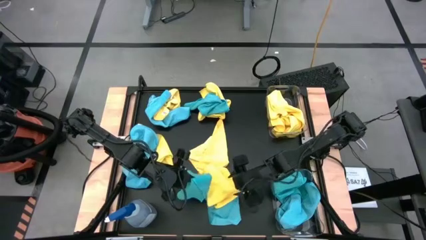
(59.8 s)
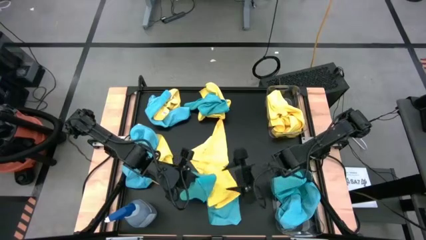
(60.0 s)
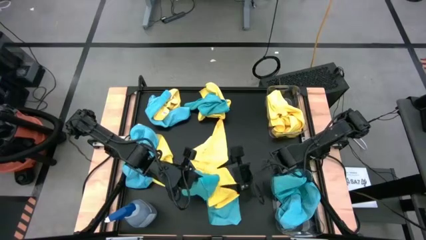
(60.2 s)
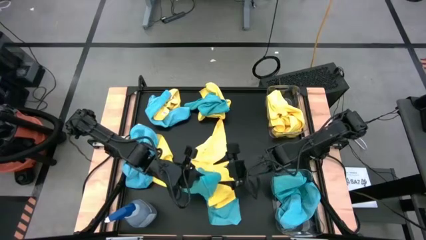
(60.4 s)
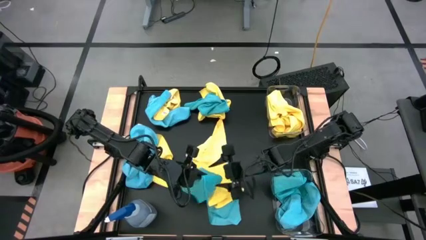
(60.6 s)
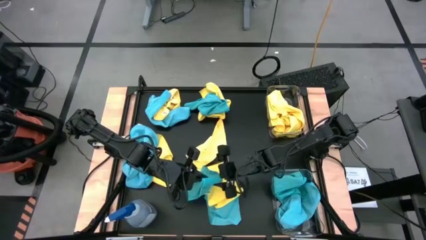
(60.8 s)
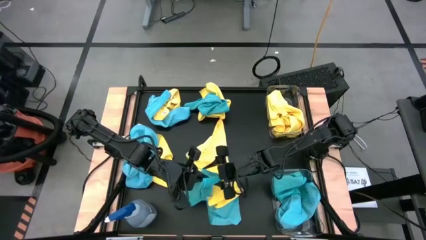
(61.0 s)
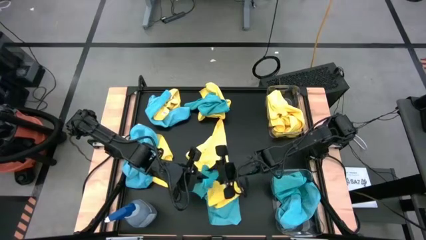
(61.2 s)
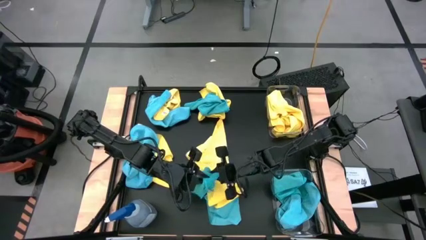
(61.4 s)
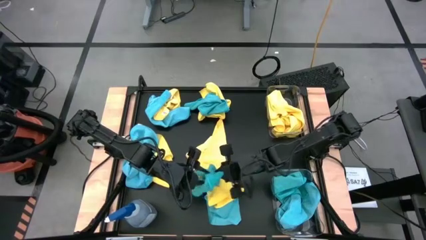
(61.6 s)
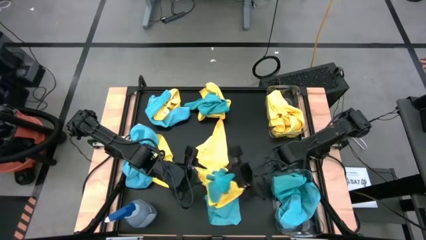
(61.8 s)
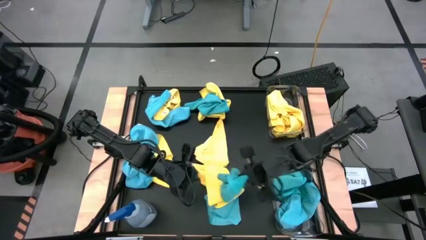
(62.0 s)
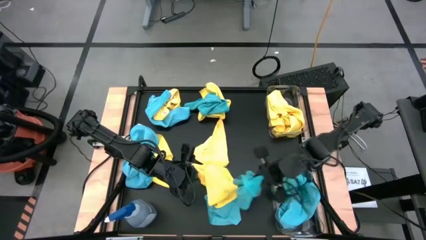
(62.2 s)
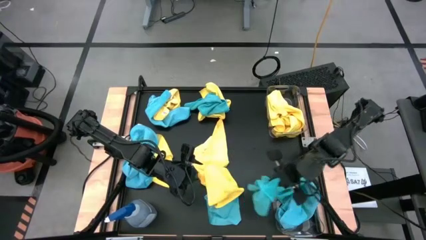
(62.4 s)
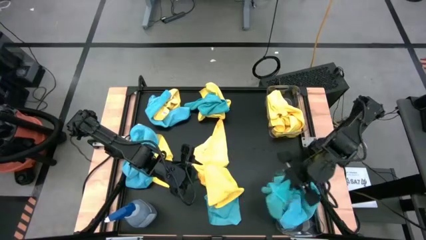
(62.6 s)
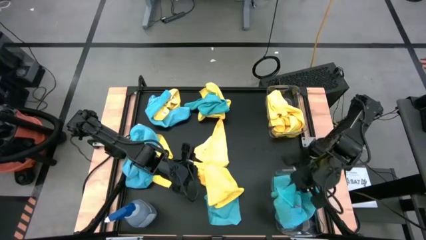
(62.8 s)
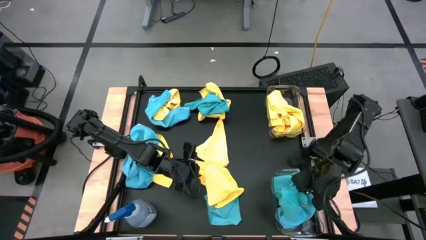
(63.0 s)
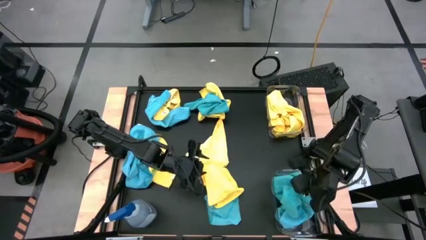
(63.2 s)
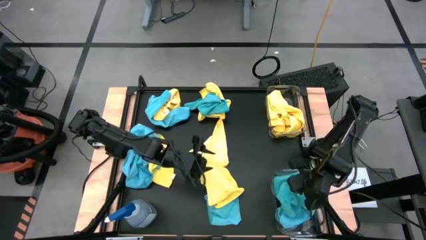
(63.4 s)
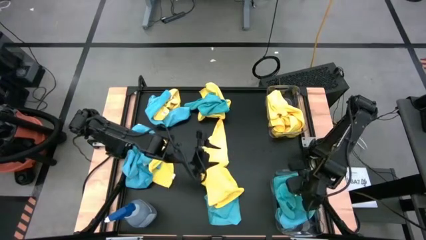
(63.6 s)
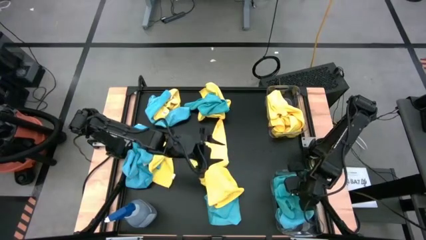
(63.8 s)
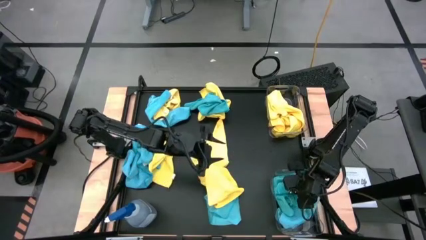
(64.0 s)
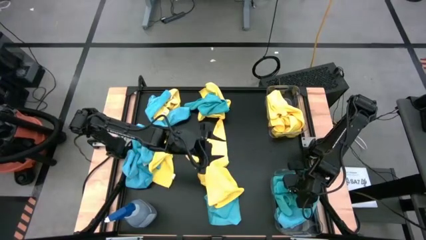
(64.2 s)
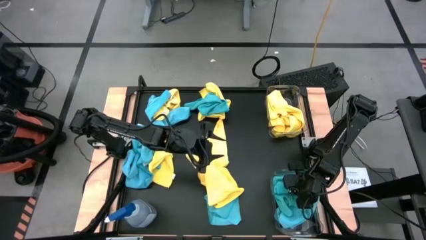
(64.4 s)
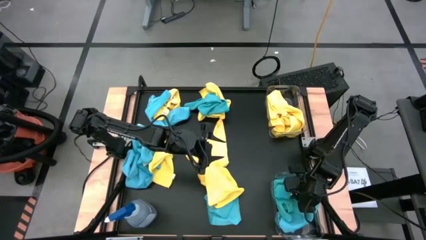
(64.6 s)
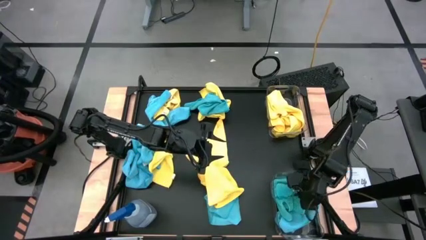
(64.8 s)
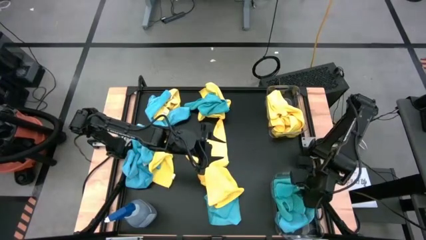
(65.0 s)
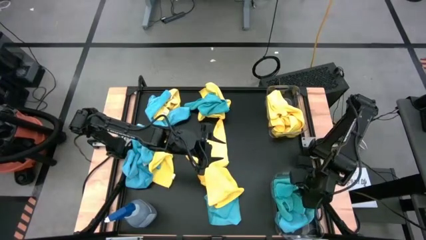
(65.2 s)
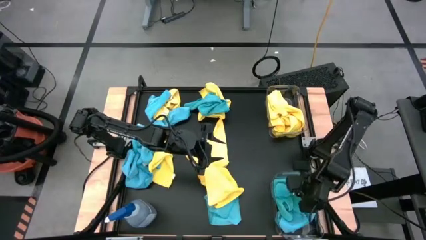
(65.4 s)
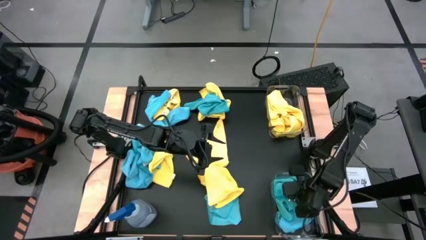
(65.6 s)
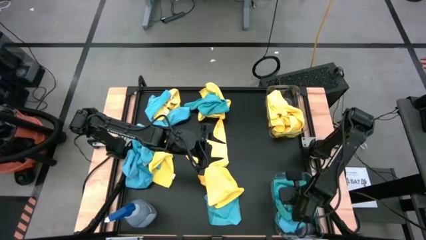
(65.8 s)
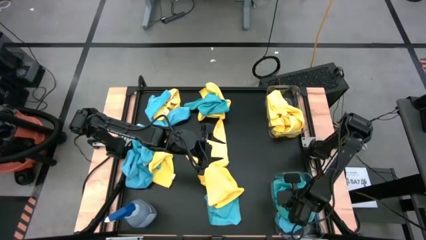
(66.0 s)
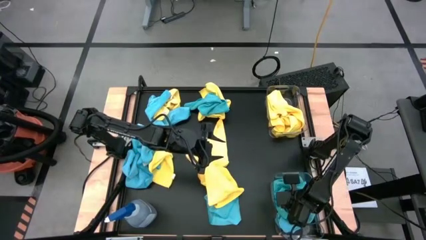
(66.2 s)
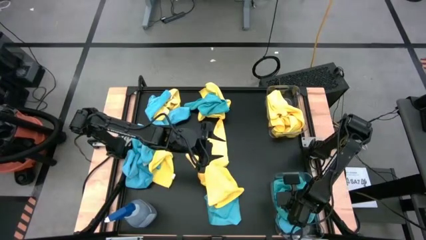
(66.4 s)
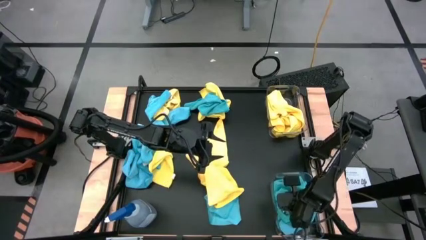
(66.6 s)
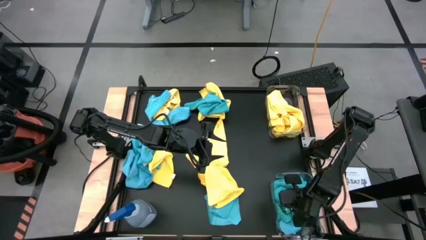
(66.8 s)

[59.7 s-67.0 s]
Task: Sort microfiber towel by color & place in baskets
Put the blue towel into the bottom transparent bin

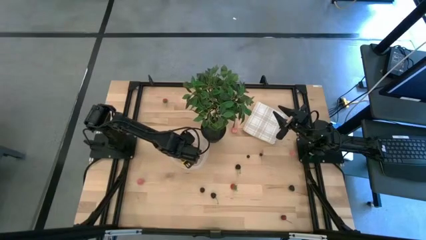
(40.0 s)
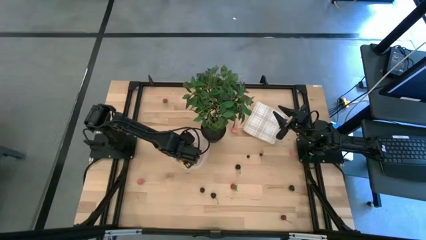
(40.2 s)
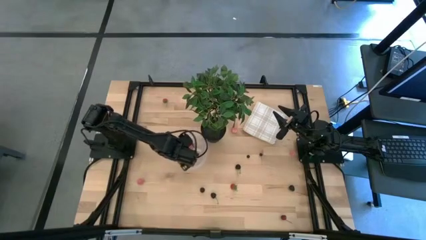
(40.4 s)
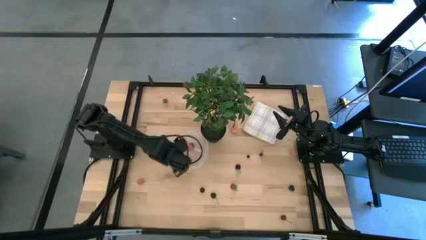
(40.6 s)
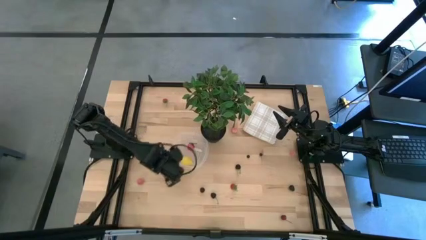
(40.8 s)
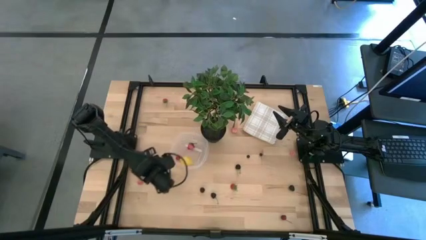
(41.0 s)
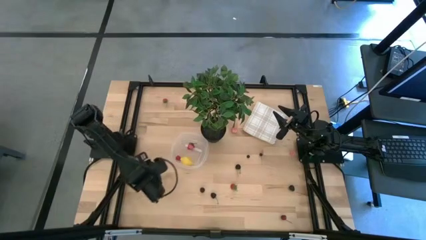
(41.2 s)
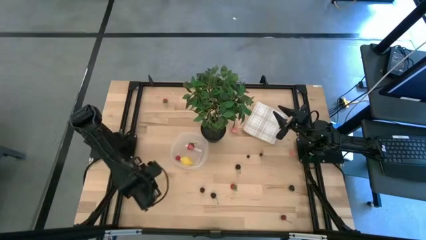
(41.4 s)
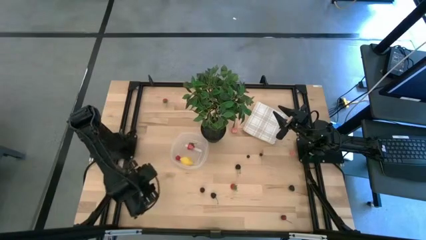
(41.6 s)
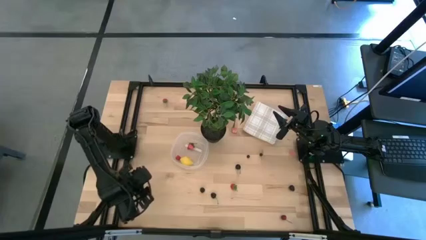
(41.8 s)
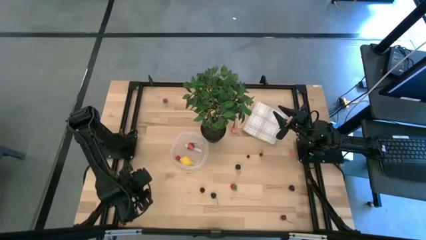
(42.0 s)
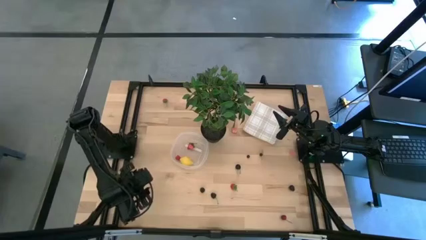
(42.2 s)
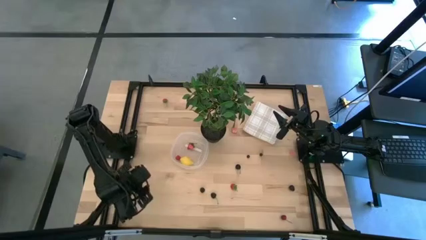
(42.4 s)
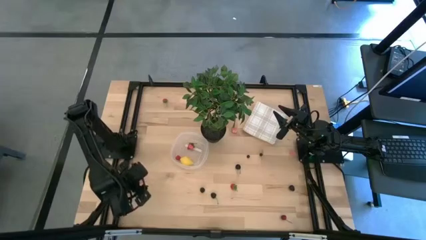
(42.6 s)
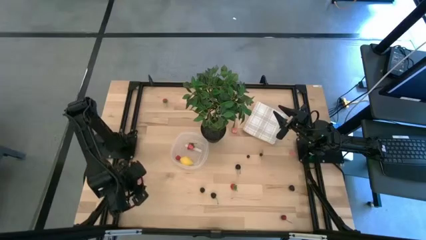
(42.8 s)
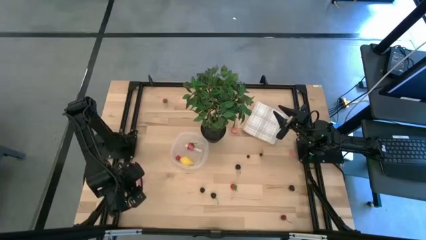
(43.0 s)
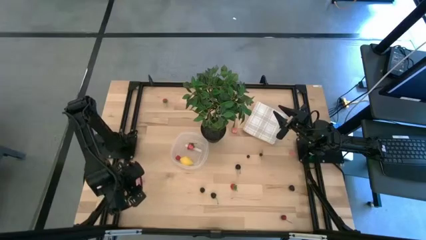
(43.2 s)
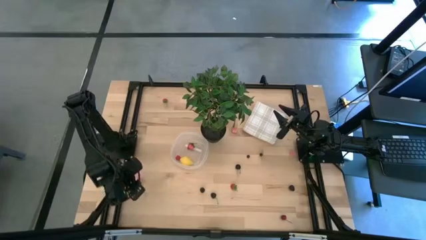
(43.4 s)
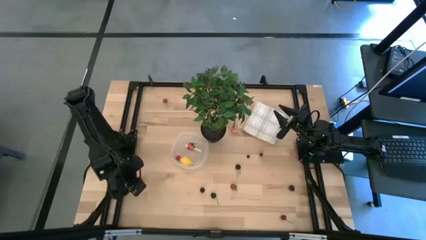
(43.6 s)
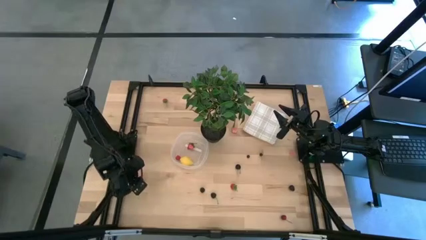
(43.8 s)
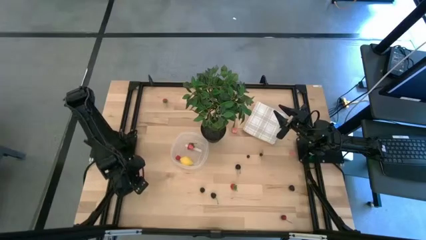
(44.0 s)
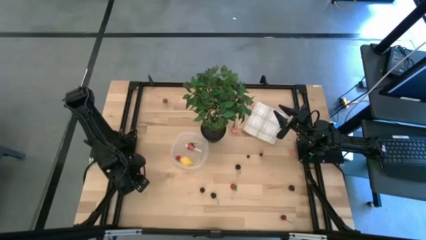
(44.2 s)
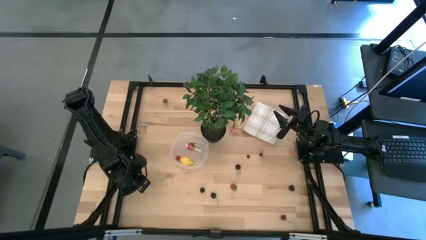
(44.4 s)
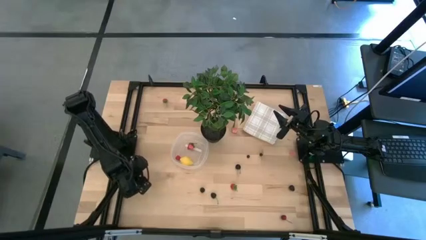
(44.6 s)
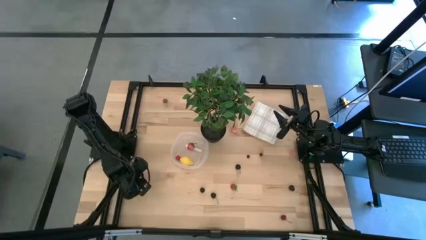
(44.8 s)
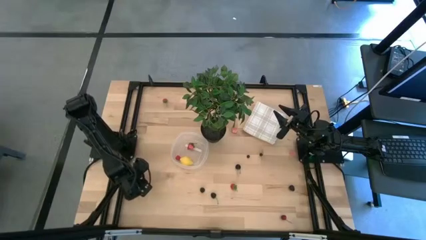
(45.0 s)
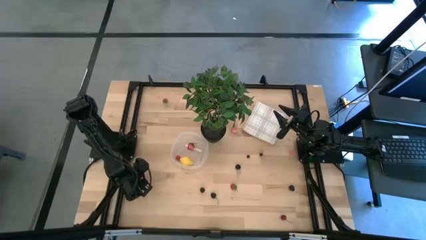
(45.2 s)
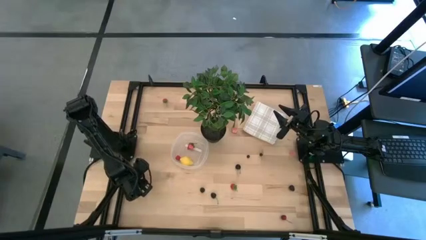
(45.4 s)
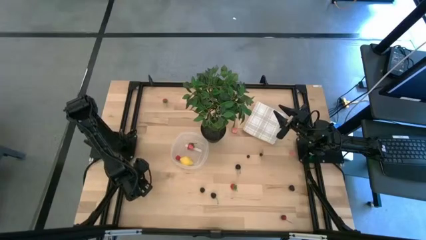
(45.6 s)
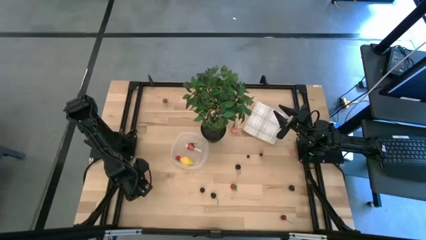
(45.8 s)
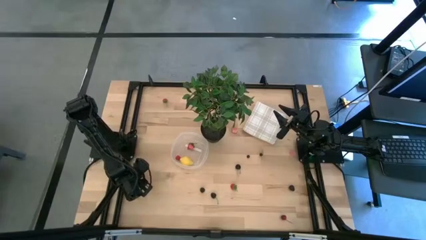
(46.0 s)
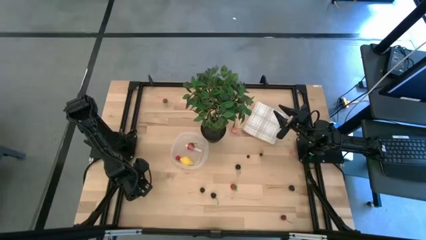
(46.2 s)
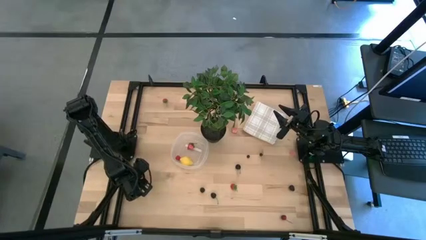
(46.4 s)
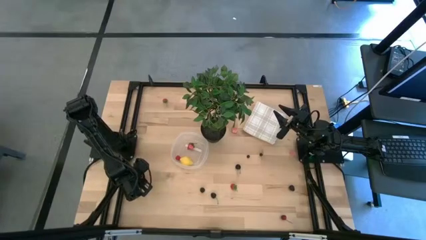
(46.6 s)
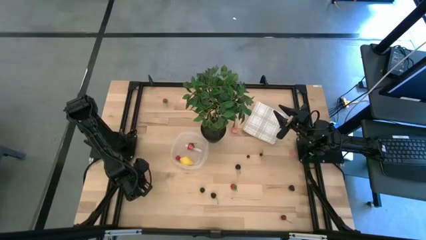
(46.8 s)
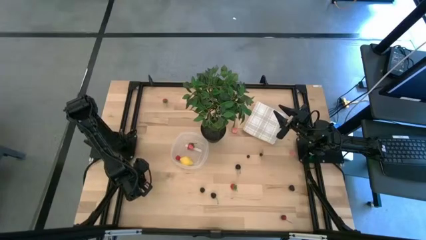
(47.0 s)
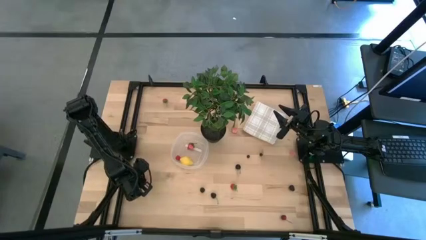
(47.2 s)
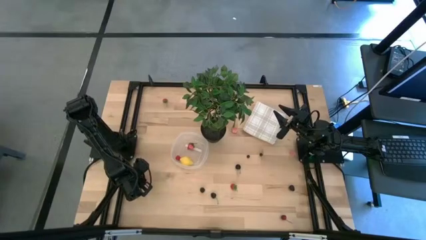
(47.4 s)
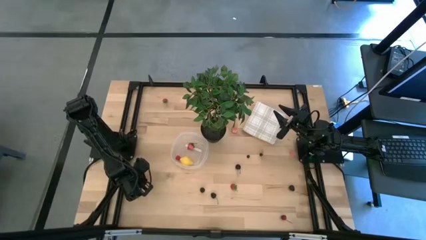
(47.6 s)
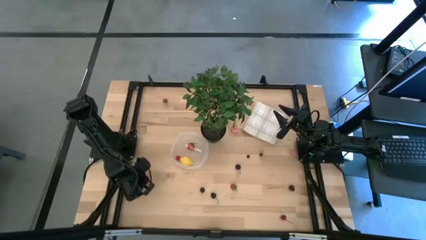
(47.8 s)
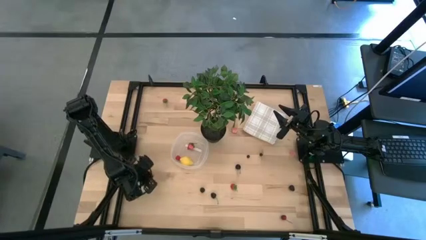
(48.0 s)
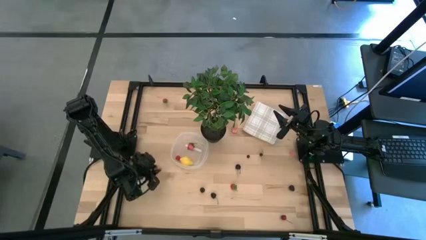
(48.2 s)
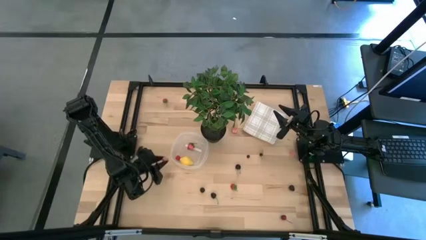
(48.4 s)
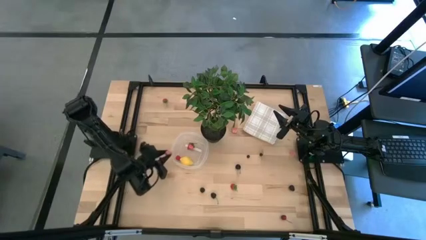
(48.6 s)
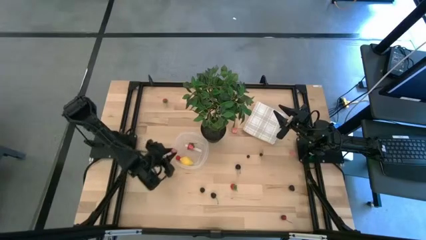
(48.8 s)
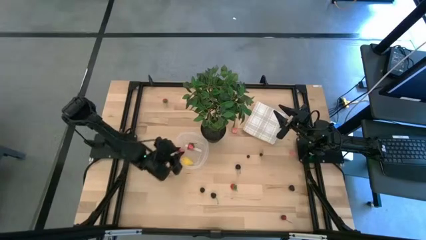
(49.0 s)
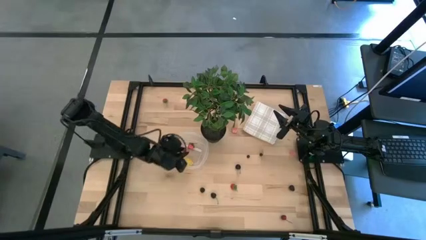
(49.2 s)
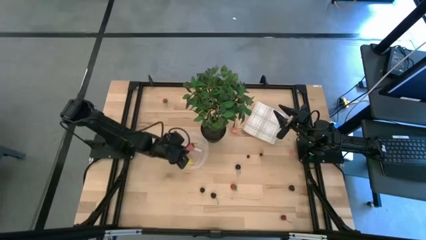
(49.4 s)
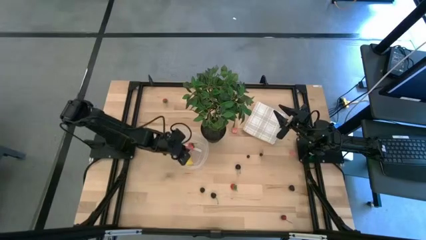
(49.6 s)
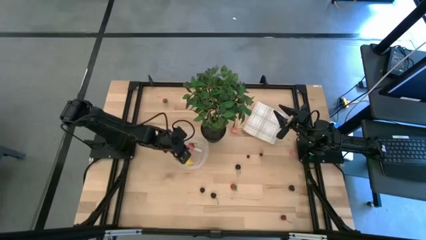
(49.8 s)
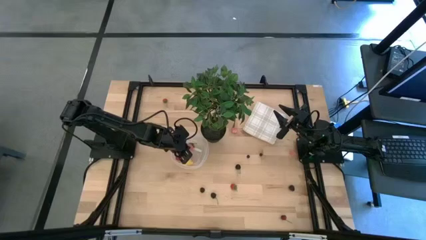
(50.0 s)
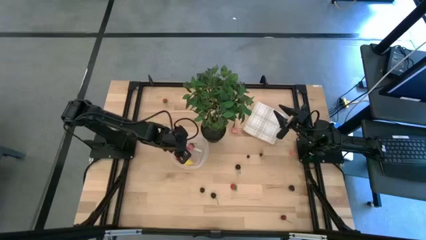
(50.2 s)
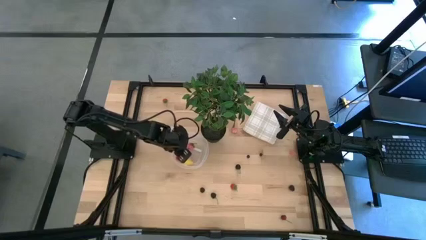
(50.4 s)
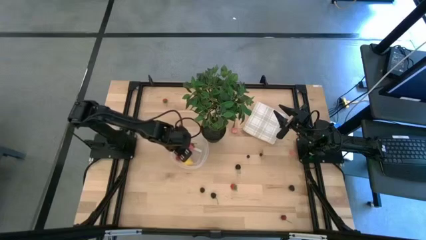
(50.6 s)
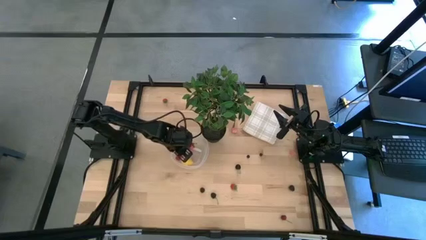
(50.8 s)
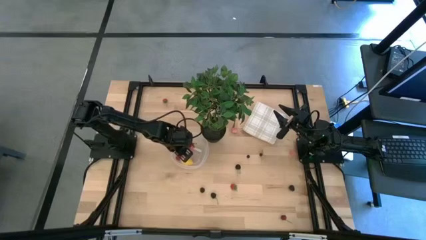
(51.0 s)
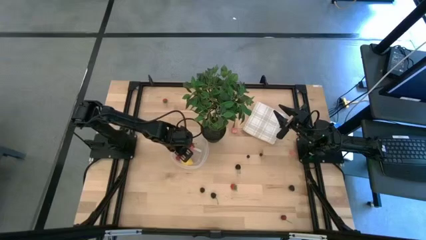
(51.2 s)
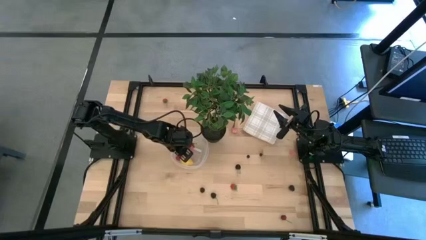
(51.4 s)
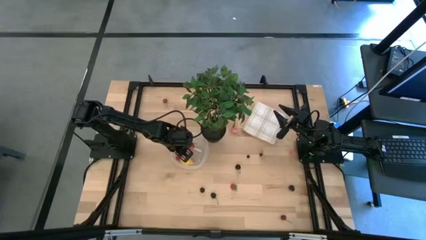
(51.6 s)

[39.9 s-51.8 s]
Task: Pick and placing Produce into tupperware
Put the bottom left pink peach into the transparent bin
